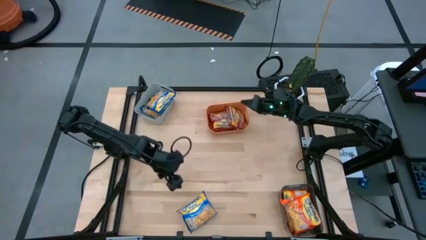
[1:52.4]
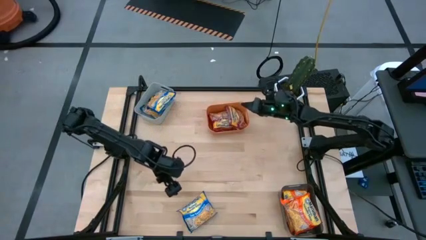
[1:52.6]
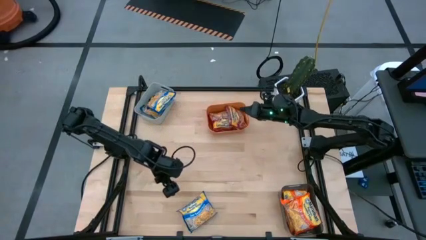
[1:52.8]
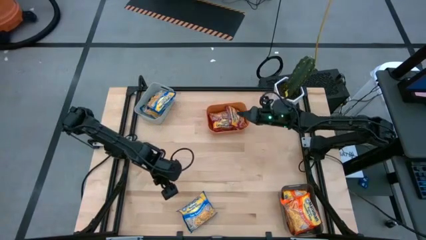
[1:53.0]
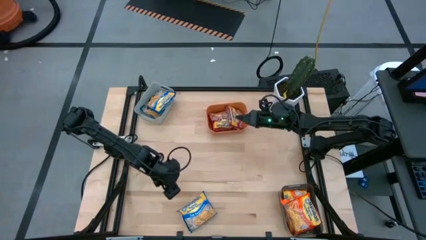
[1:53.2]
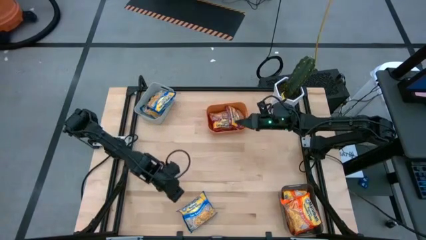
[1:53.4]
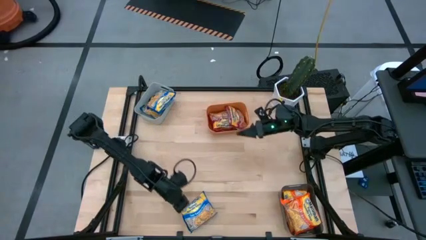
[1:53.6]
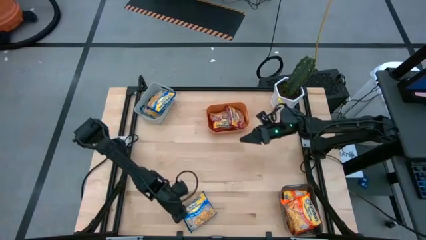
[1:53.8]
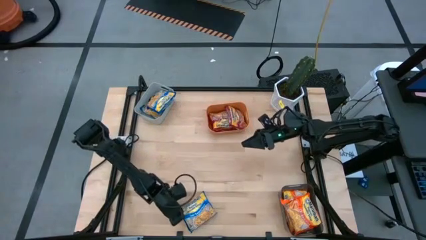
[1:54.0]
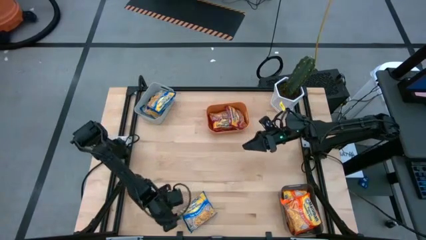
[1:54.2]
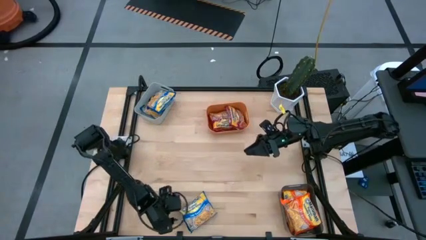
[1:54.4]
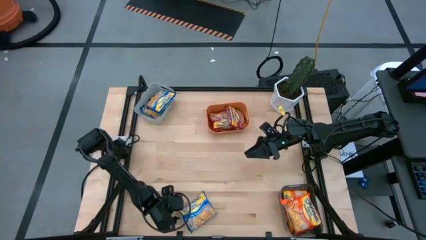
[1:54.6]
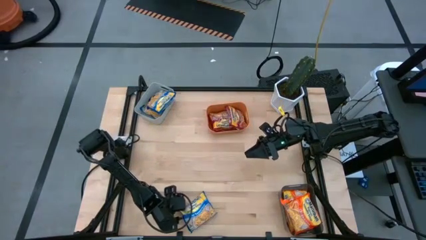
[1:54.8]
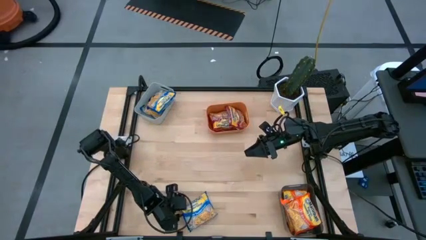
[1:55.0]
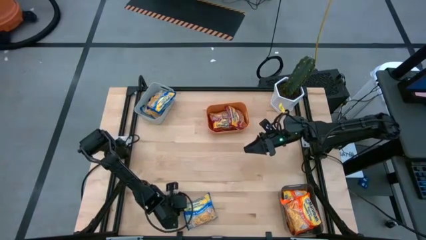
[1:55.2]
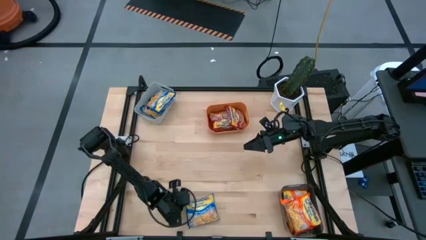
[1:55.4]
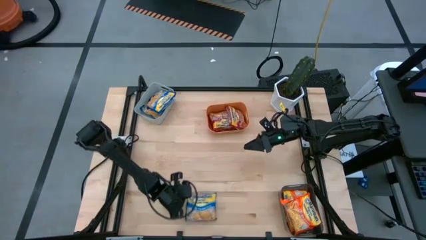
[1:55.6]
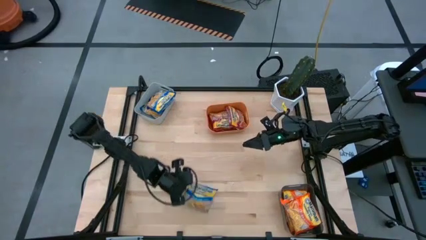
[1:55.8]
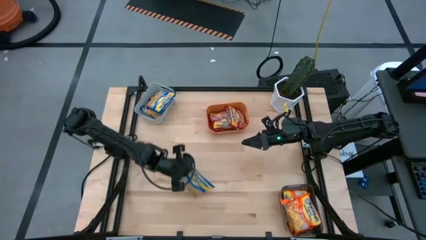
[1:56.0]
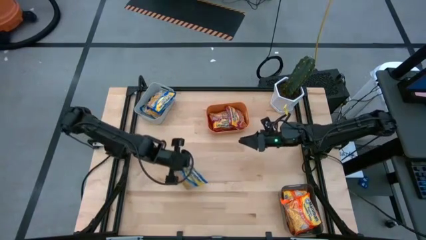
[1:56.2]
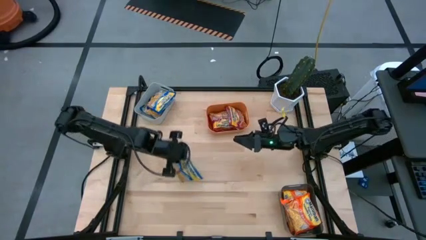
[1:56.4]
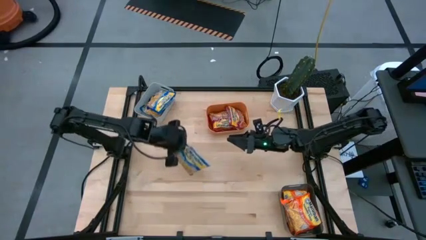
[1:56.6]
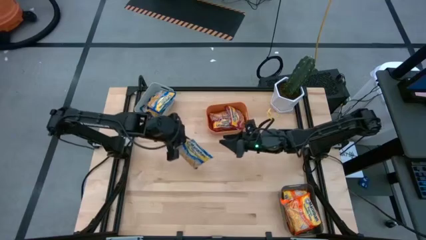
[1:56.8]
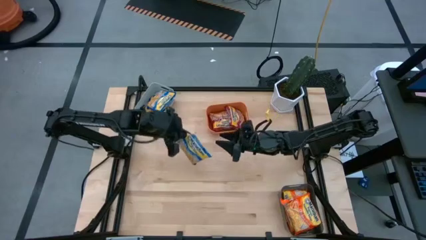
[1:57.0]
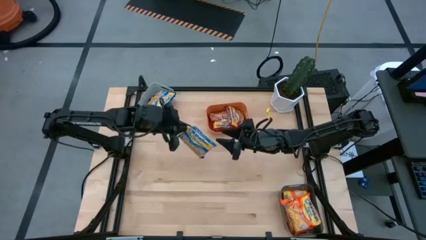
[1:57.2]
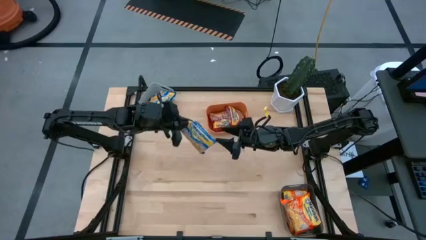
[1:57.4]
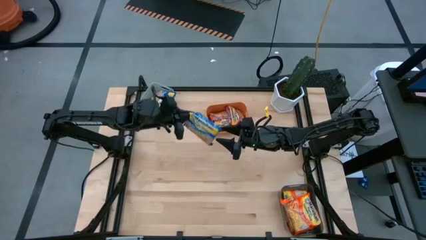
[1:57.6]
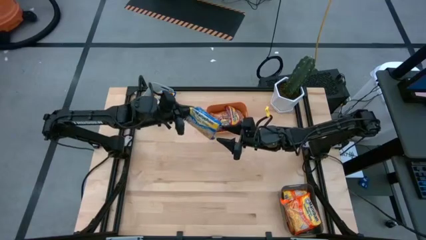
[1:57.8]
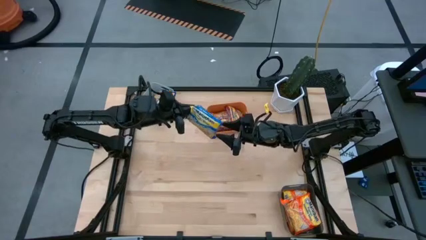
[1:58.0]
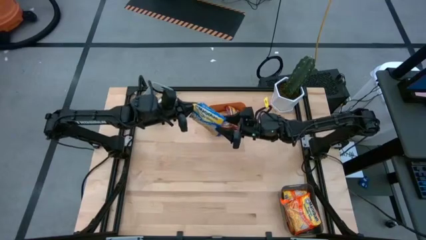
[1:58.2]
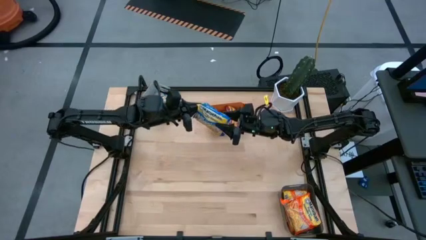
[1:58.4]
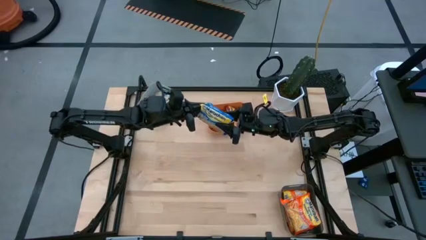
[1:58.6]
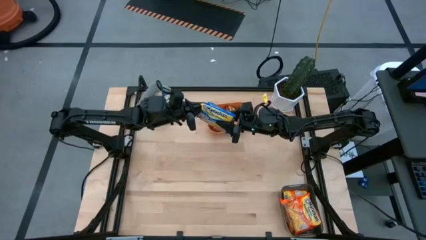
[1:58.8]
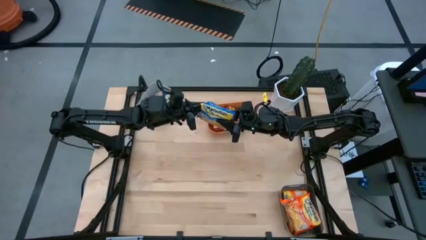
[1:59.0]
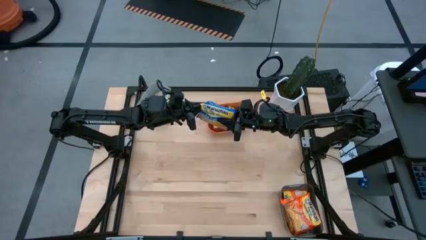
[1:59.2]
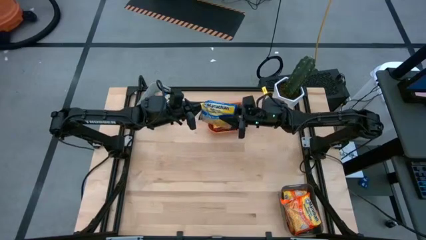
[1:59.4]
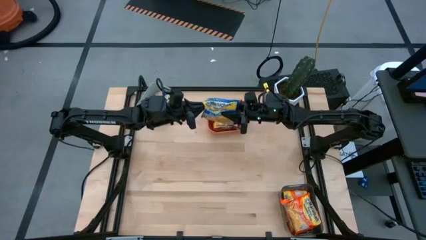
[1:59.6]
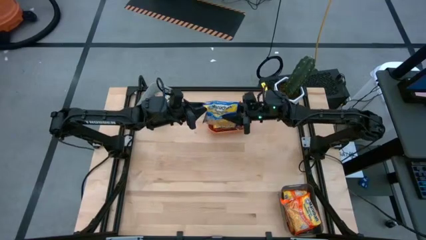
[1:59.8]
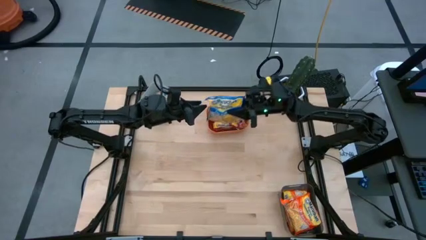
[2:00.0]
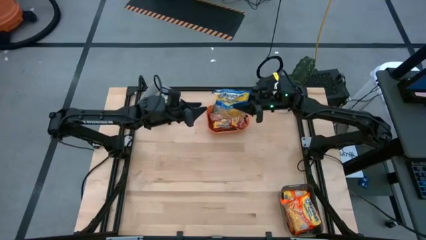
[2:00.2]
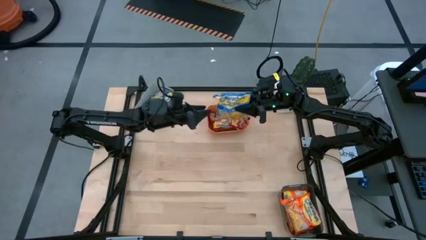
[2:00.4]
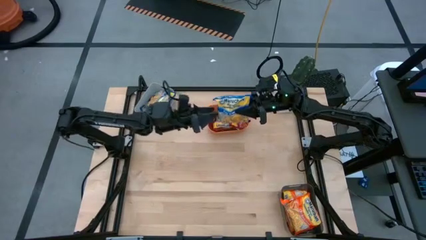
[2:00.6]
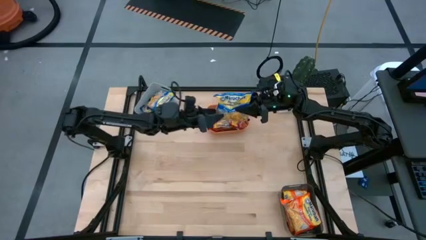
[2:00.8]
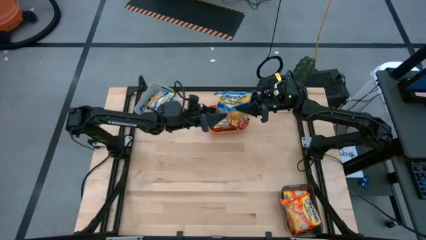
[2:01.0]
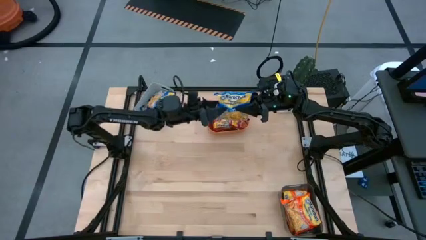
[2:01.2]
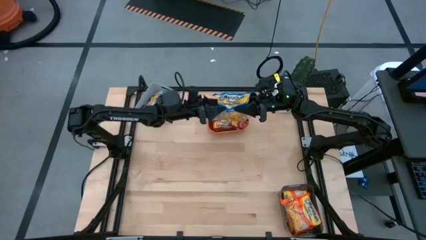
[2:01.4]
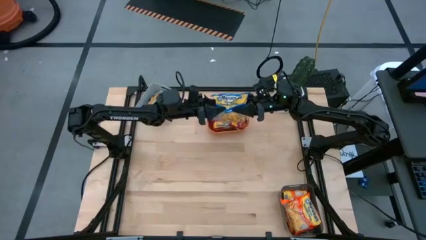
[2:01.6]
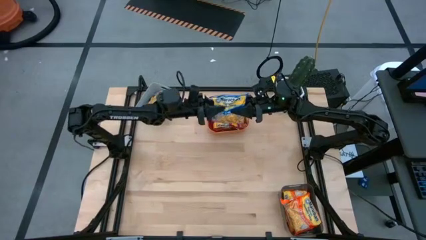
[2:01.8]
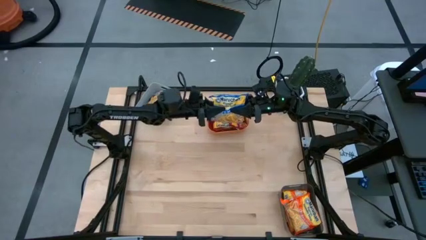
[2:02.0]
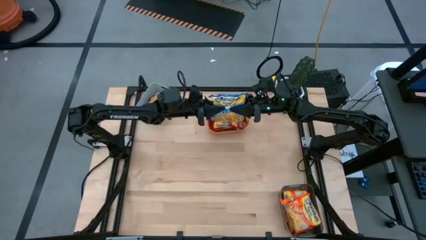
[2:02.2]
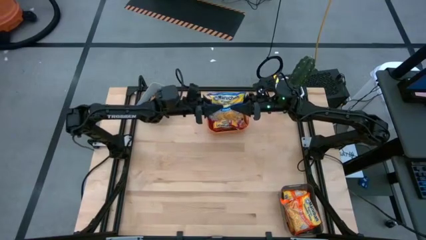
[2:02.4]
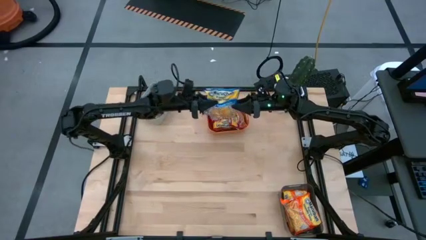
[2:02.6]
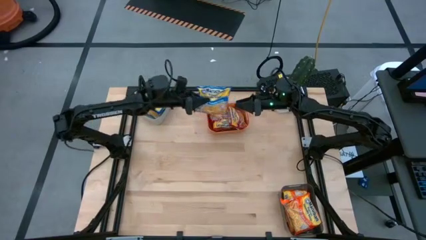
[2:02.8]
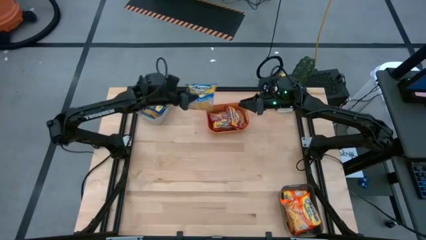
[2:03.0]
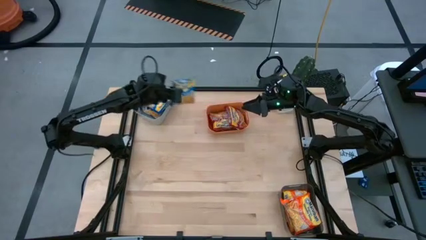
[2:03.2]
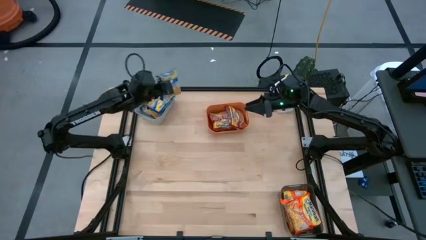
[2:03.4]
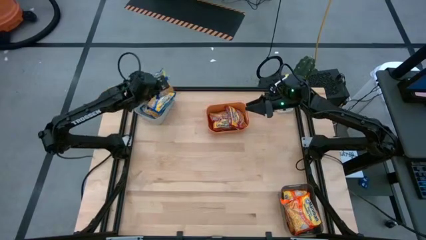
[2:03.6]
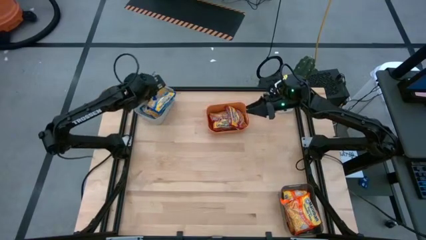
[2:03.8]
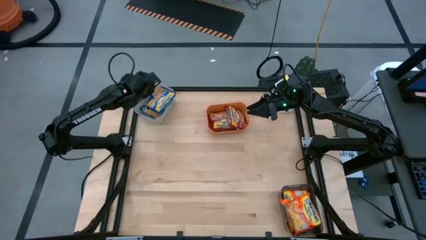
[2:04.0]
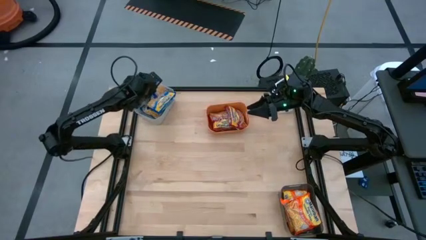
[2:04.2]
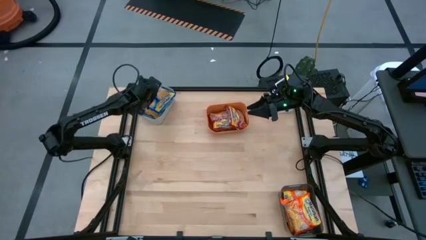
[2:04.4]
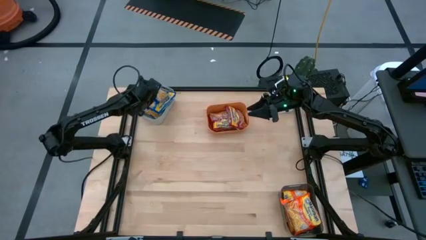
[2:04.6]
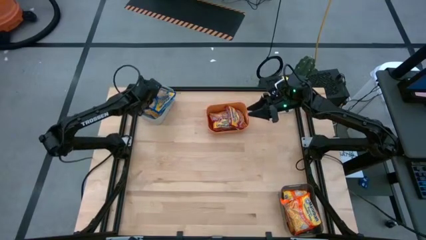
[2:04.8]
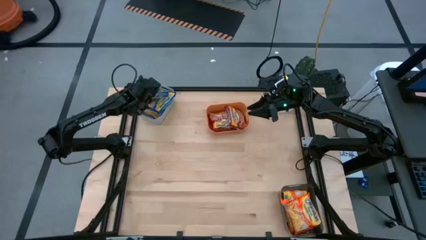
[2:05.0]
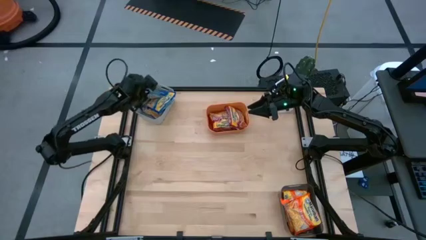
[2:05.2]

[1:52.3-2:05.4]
Task: Sort Maruchan noodles
Put the blue noodle pack into the gray bin

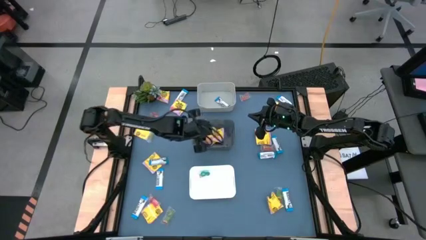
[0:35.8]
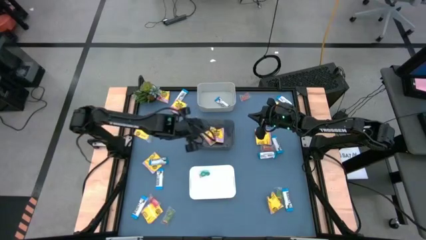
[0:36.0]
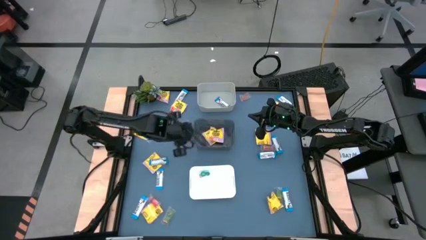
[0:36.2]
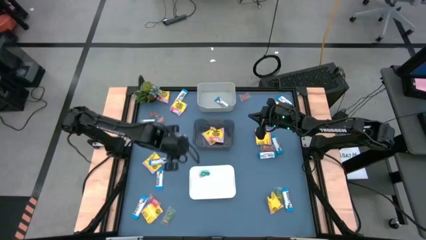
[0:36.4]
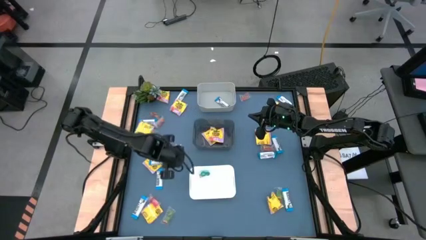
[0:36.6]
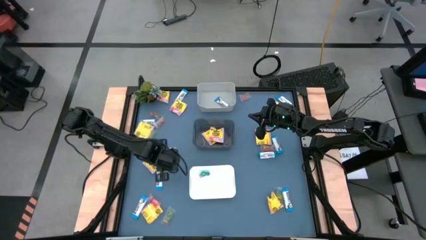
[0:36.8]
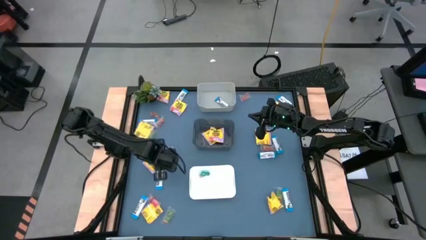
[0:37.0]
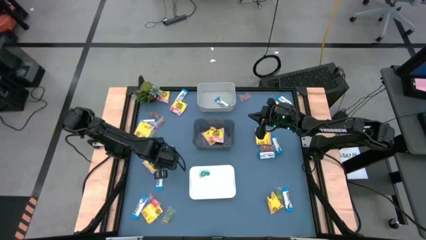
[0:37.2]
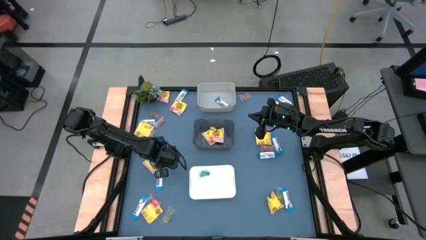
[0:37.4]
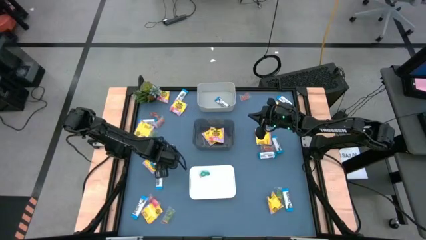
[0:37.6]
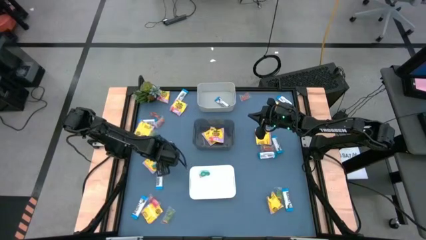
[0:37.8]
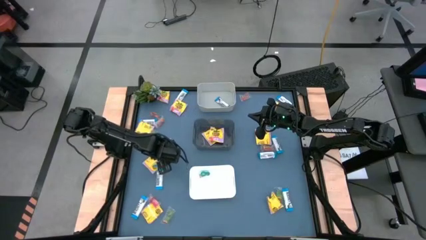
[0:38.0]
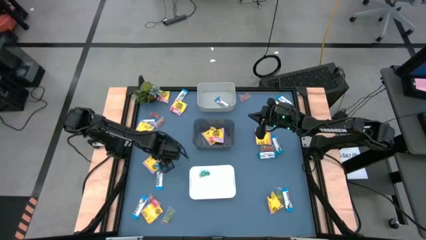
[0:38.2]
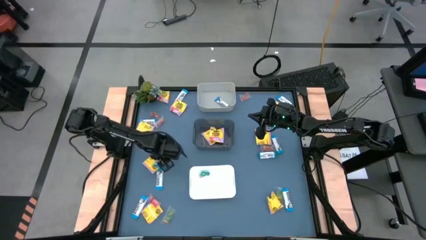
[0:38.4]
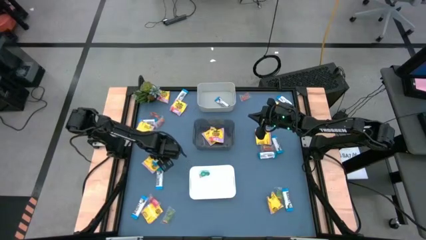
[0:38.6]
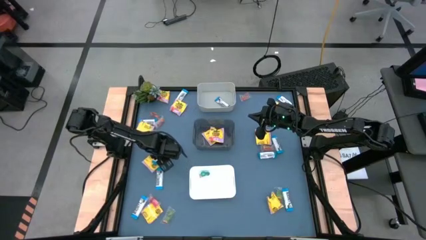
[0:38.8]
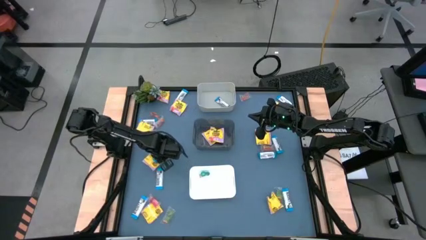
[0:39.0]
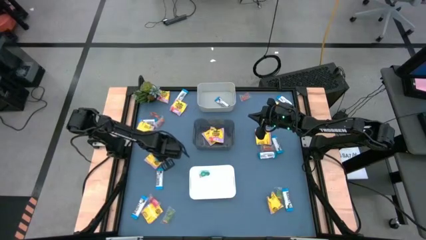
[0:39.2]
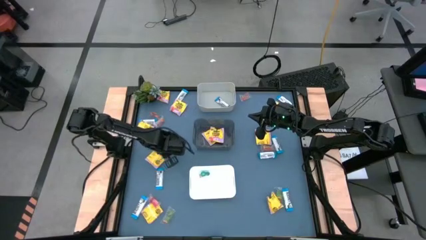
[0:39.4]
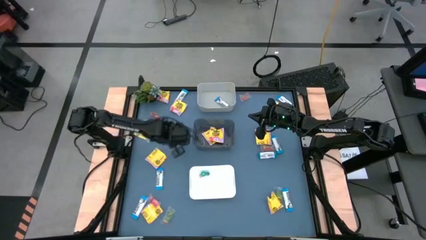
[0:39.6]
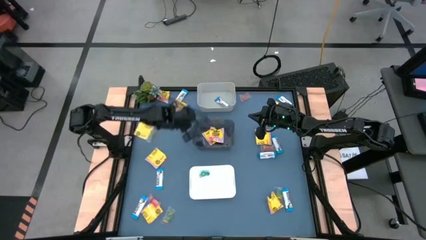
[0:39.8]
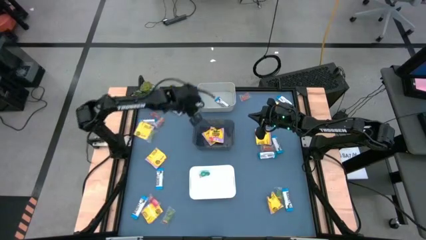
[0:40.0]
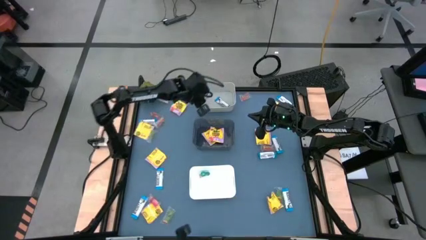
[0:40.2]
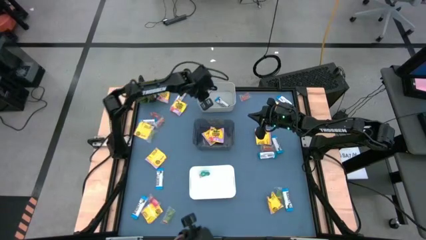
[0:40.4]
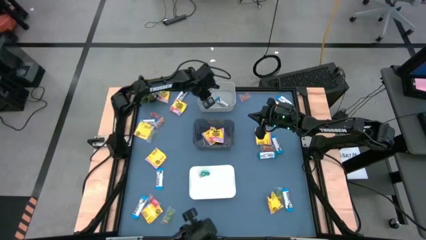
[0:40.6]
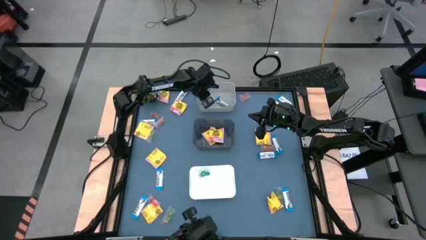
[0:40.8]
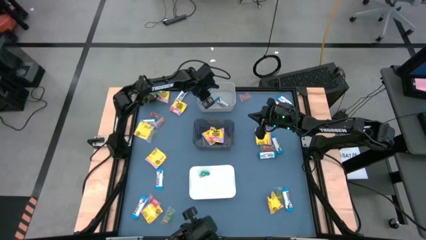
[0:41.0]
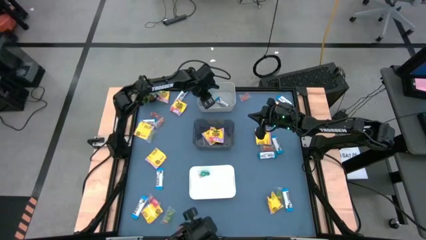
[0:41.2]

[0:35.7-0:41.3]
Task: Sort candy
Put the white chocolate bar into the gray bin
